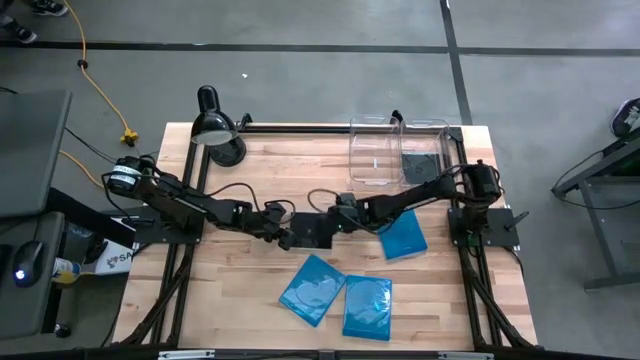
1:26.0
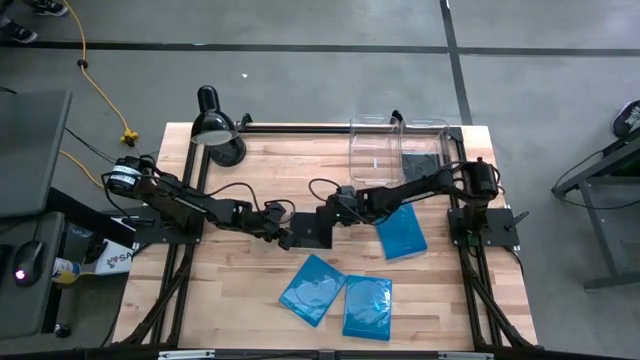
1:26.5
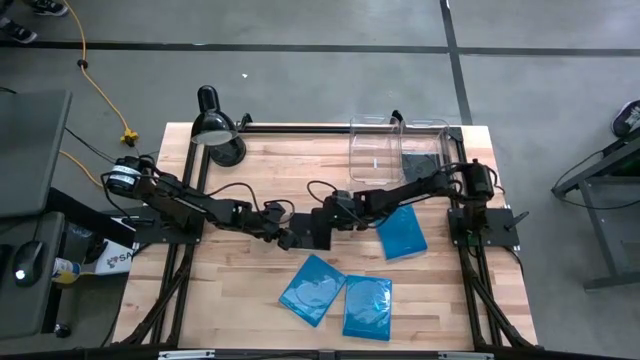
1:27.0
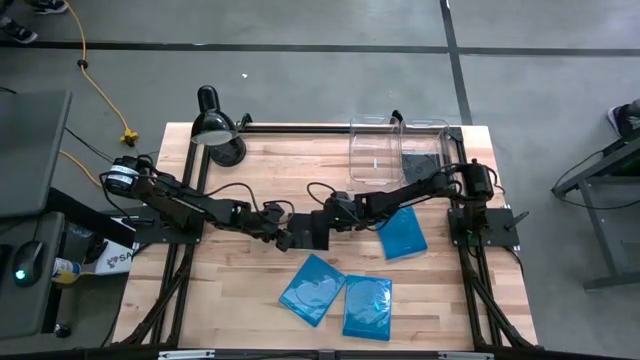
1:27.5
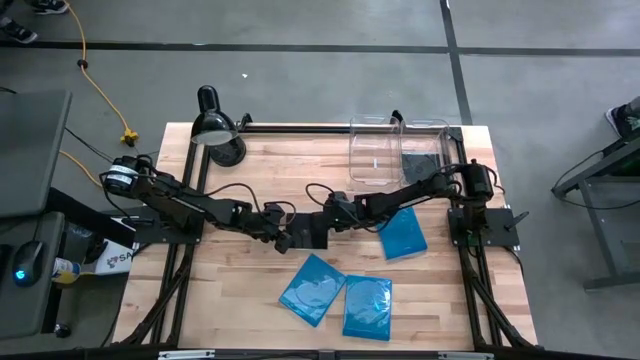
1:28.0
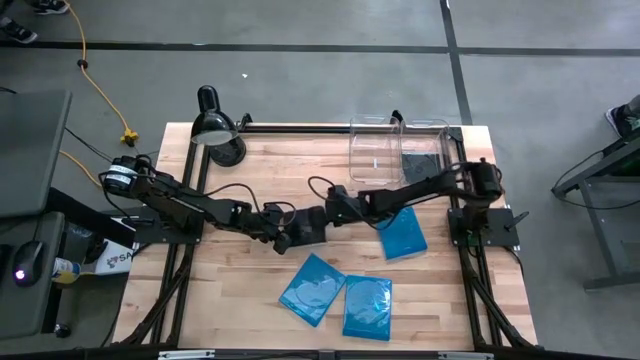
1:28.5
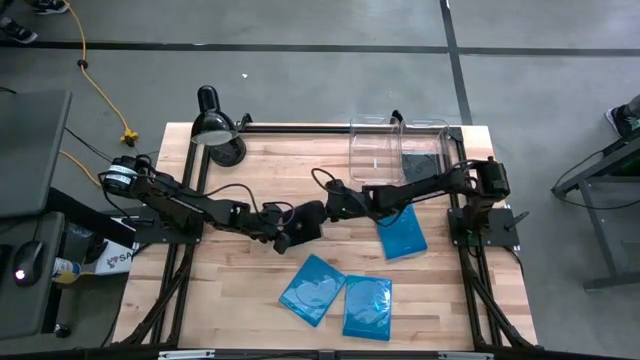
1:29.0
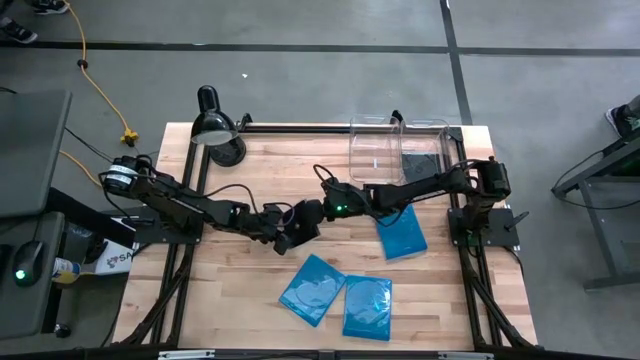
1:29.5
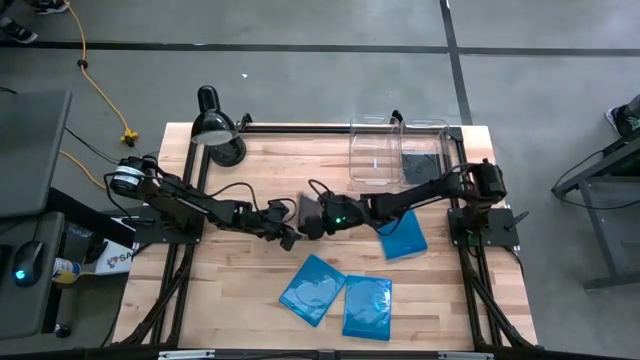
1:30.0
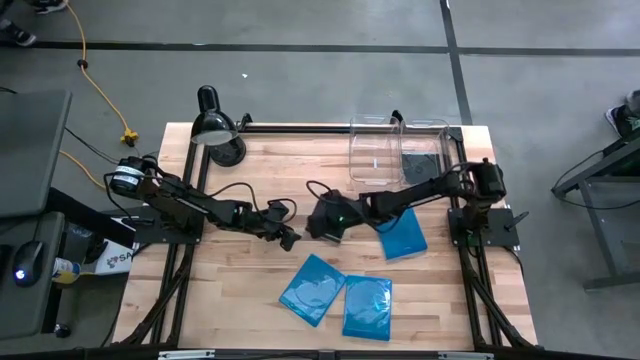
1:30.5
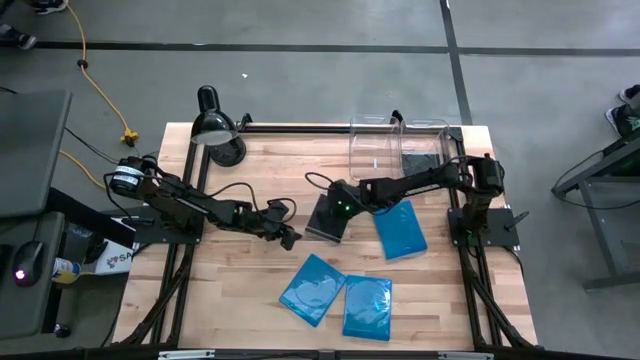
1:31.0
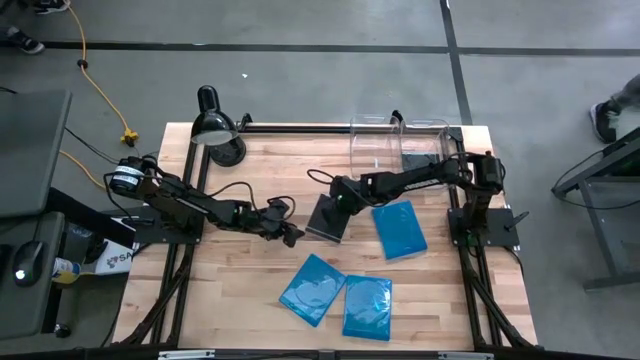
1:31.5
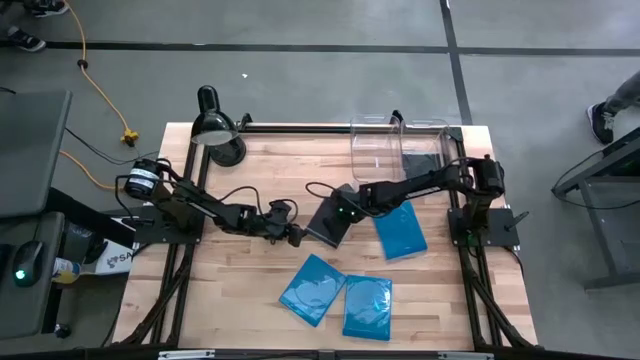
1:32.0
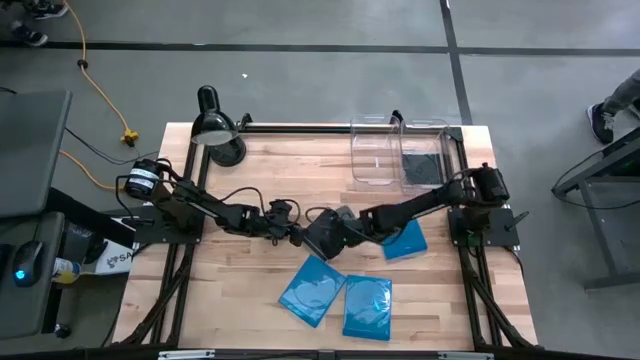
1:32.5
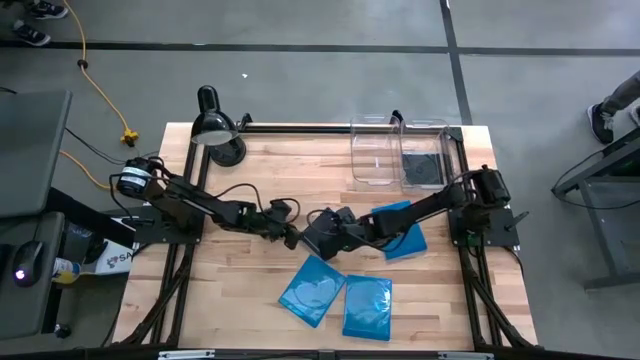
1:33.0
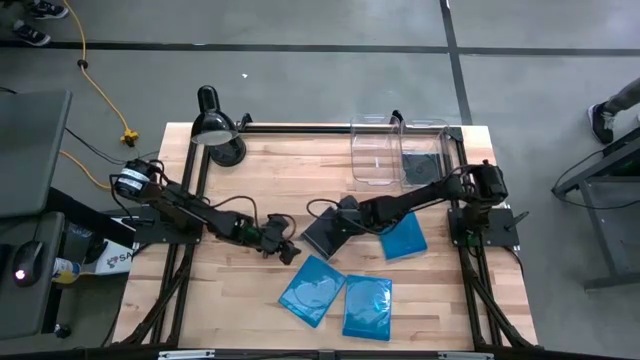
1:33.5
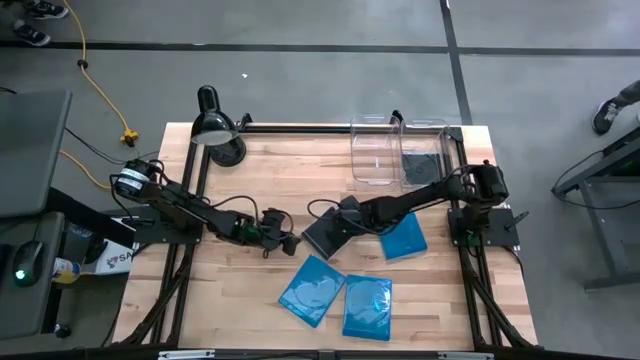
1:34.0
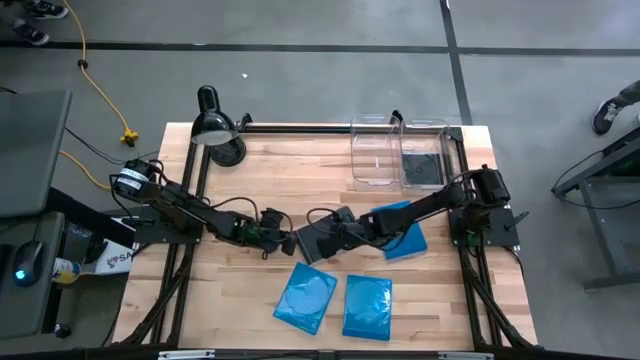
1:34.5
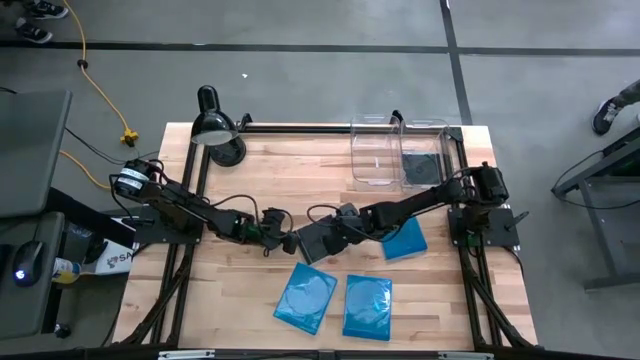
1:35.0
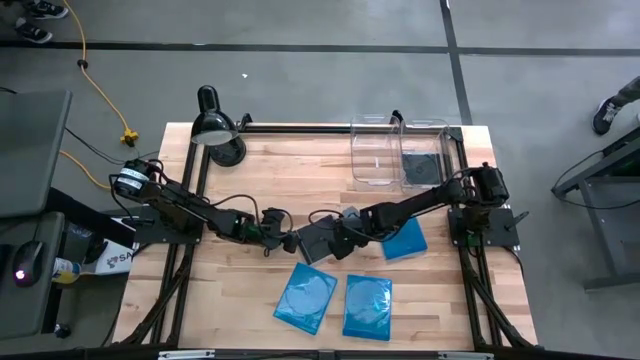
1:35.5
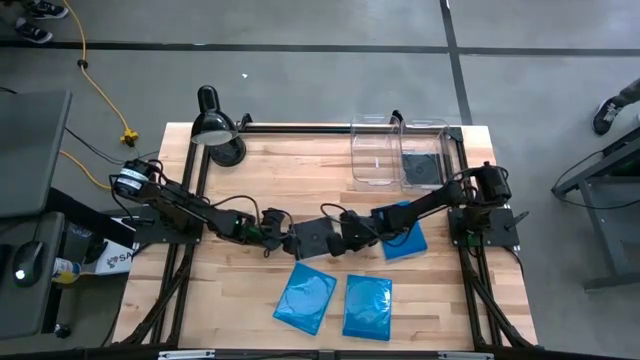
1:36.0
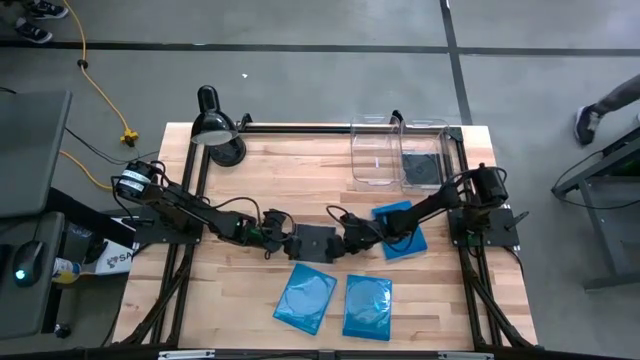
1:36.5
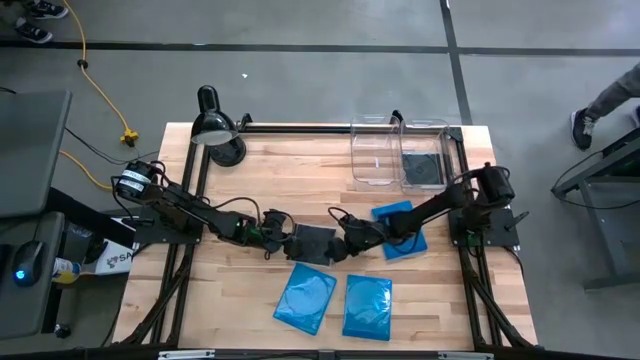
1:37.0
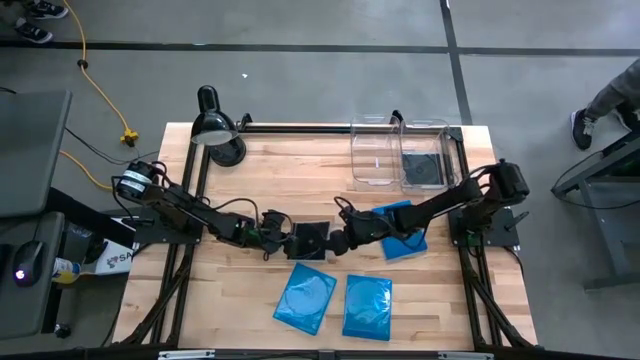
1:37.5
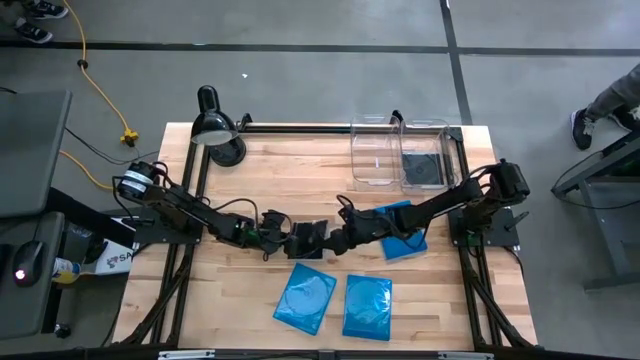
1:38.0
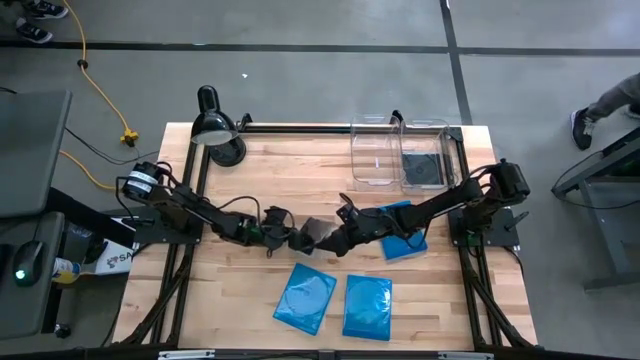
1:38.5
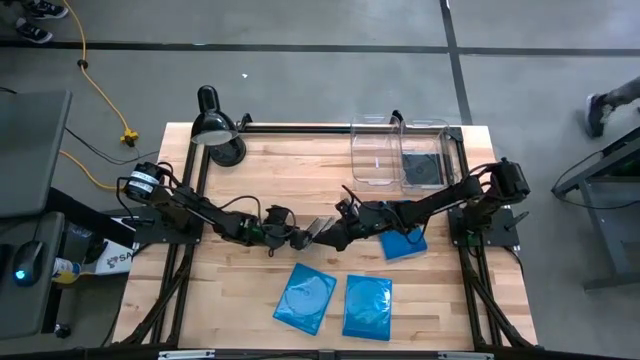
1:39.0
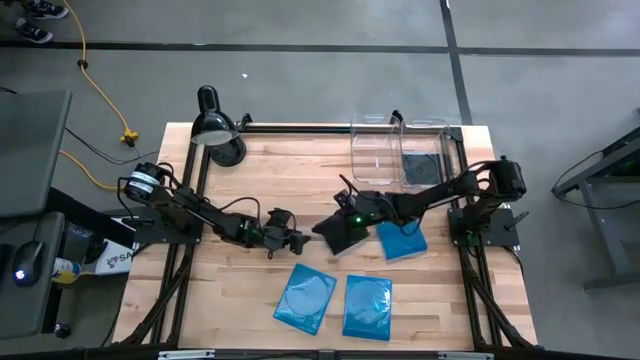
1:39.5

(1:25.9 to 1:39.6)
Task: Pick & place jewel cases by type
Put the black CD case into the right transparent bin
